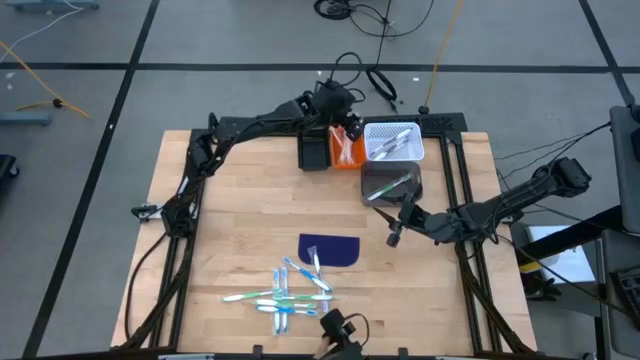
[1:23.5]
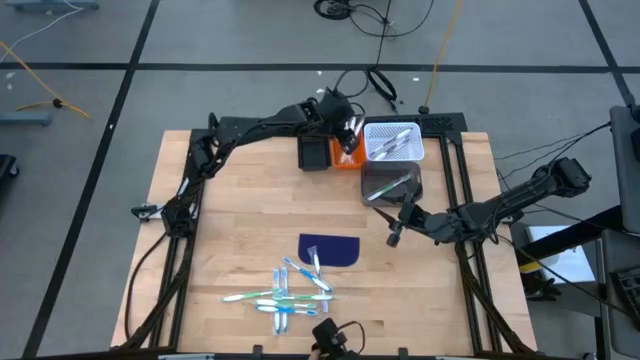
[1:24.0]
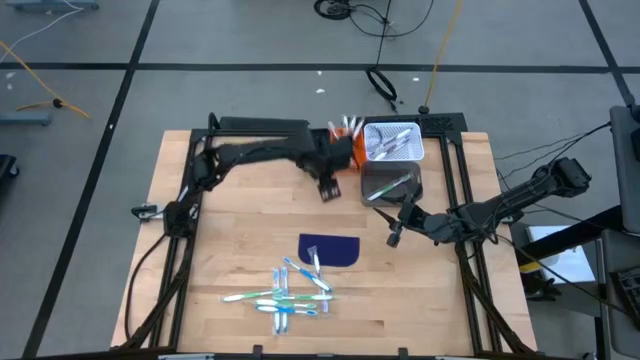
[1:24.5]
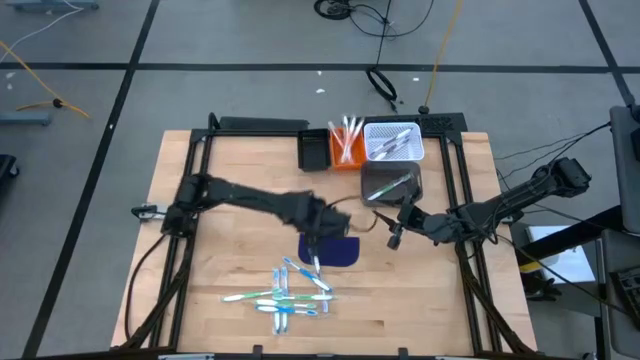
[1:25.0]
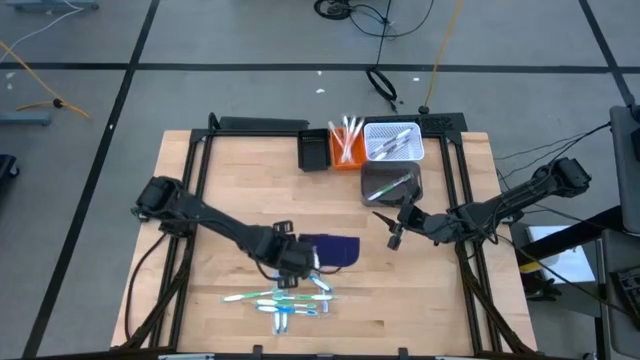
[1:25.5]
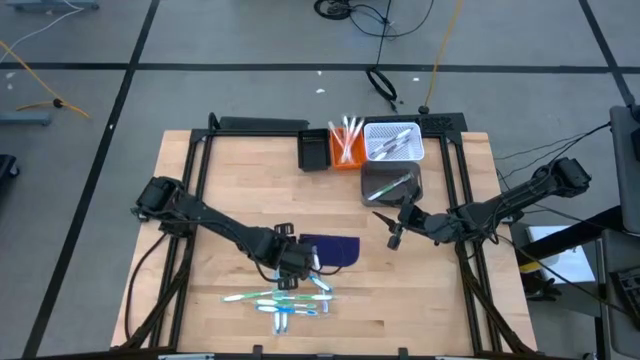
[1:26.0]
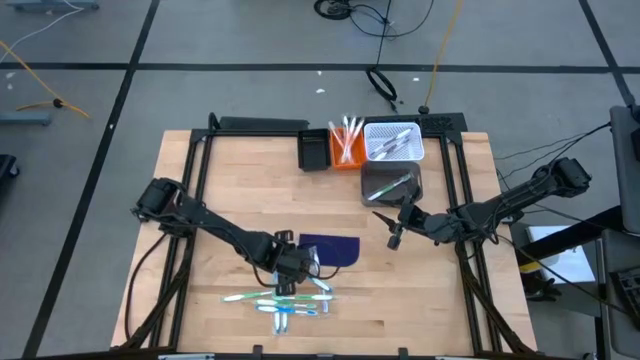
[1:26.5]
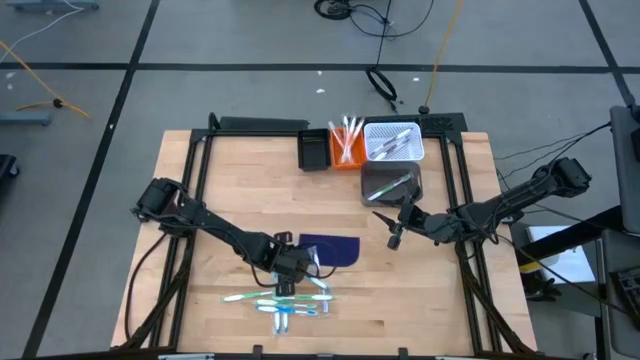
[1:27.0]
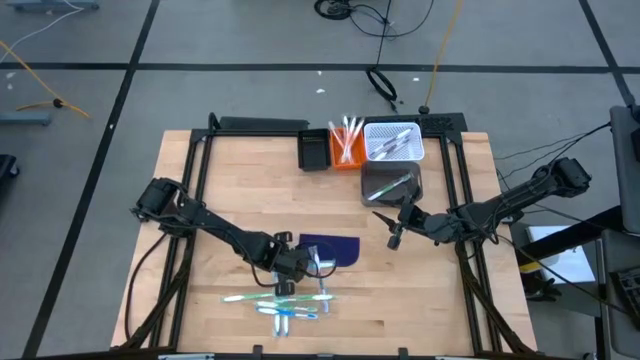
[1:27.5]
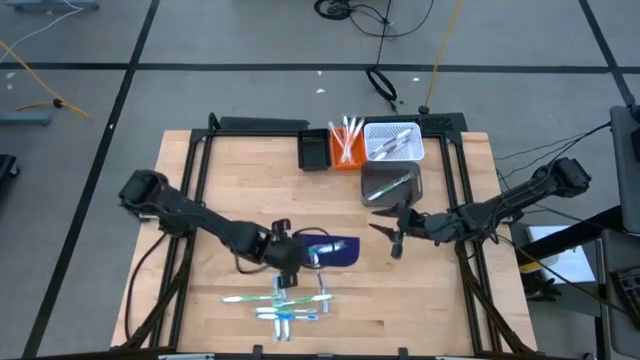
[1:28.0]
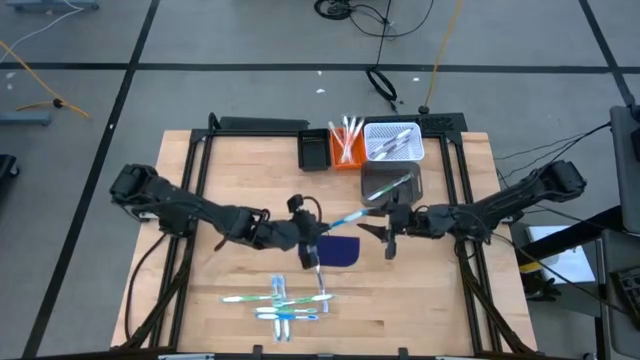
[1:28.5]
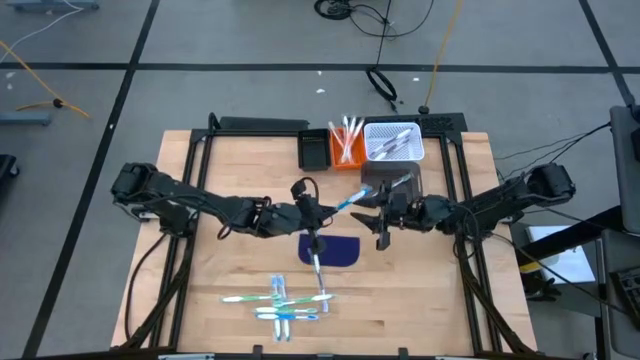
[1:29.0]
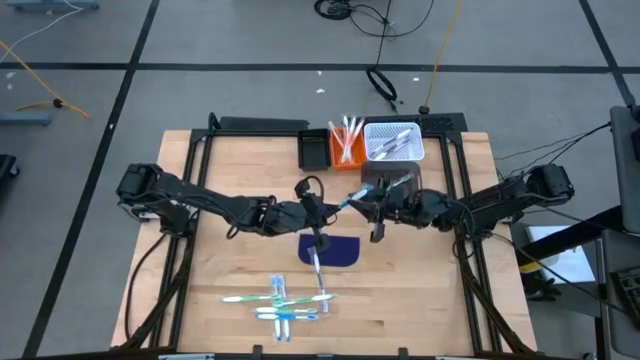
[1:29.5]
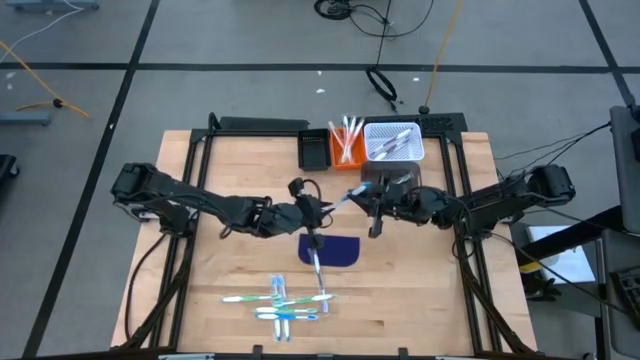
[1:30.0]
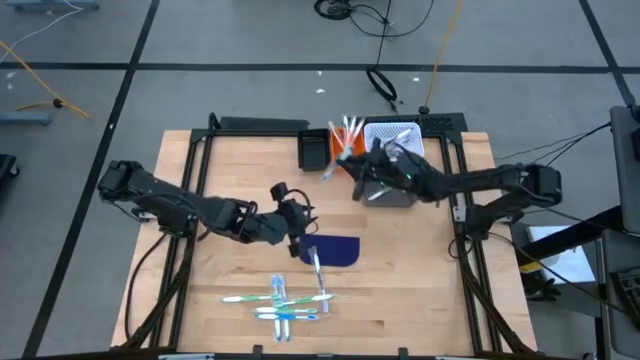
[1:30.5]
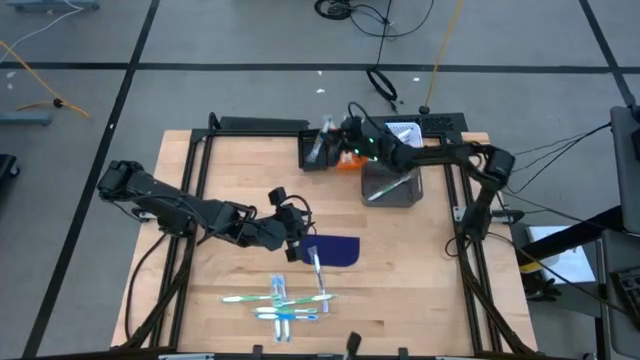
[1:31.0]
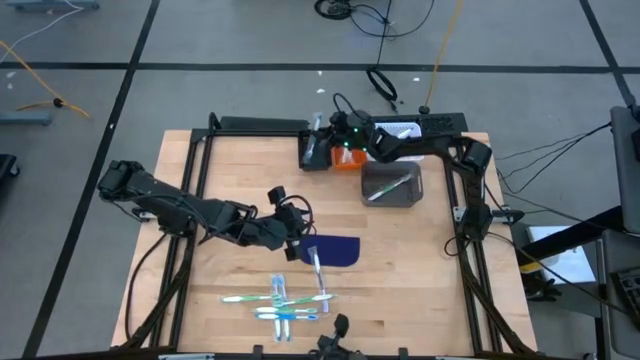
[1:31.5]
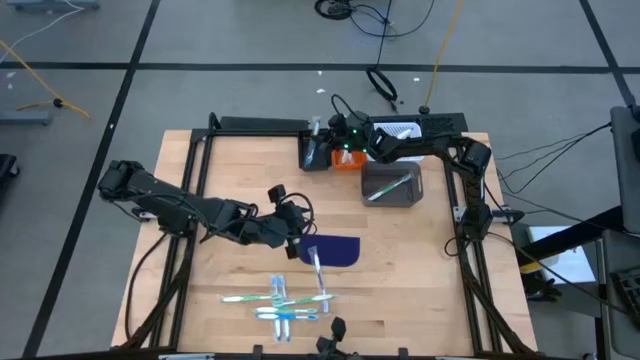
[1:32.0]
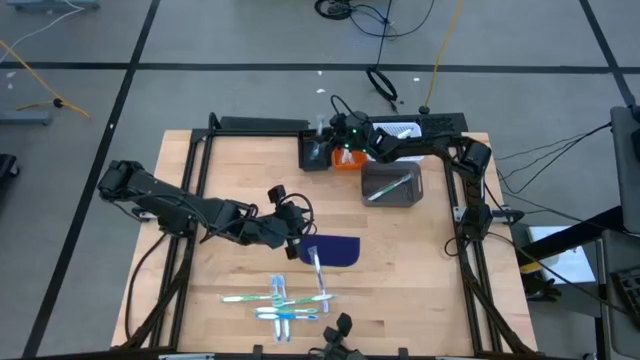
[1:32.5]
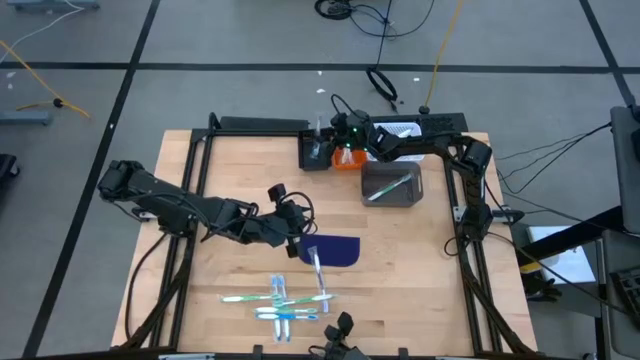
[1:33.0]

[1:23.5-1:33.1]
Task: Pick & Place Toothbrushes
Put the blue toothbrush into the black bin

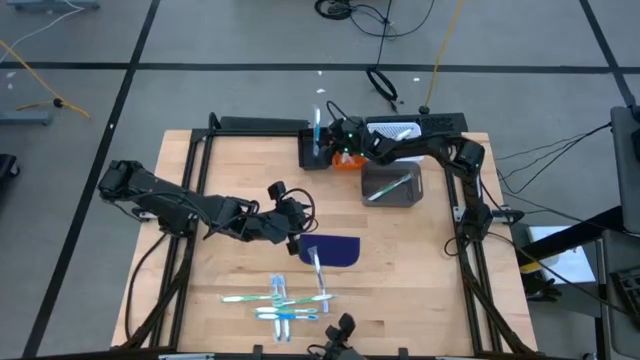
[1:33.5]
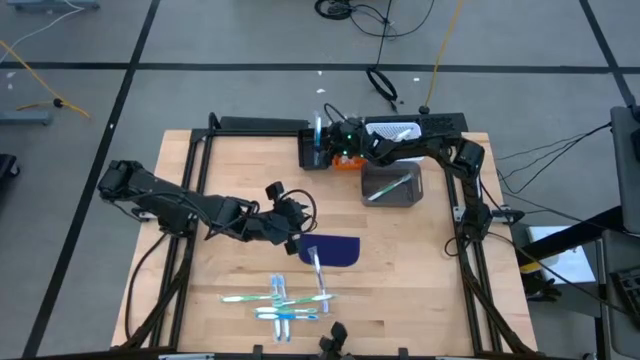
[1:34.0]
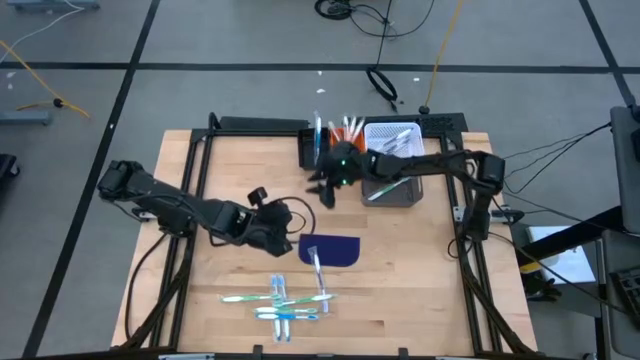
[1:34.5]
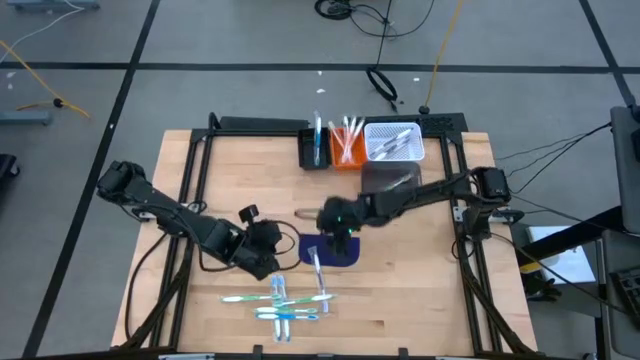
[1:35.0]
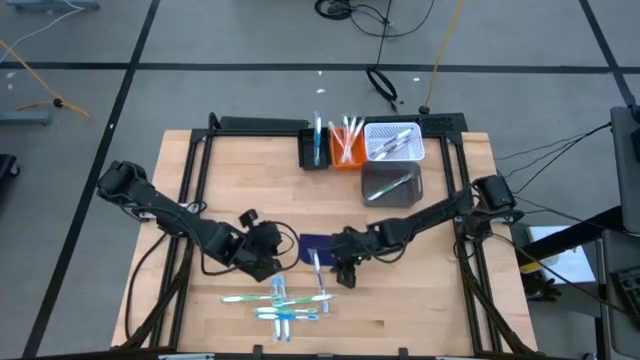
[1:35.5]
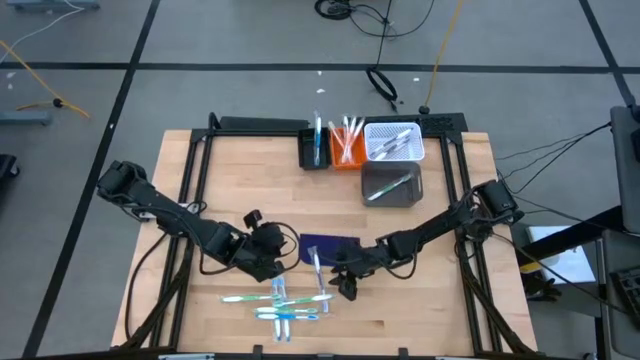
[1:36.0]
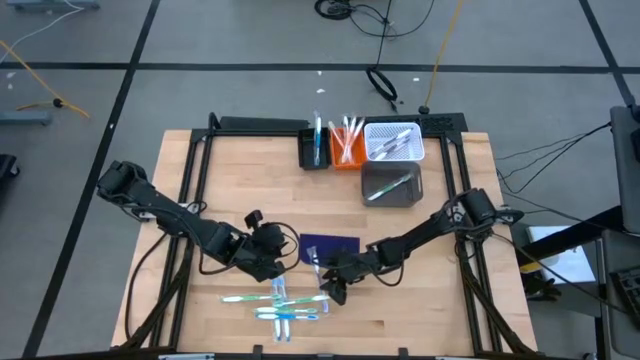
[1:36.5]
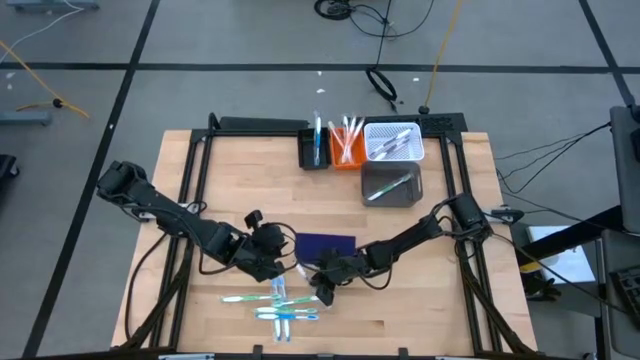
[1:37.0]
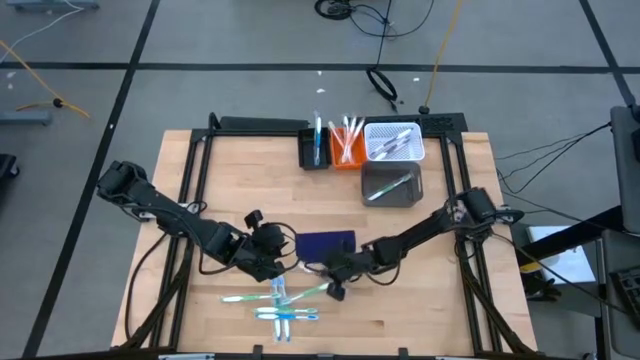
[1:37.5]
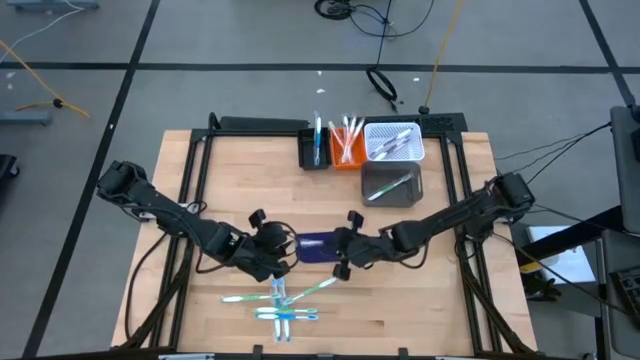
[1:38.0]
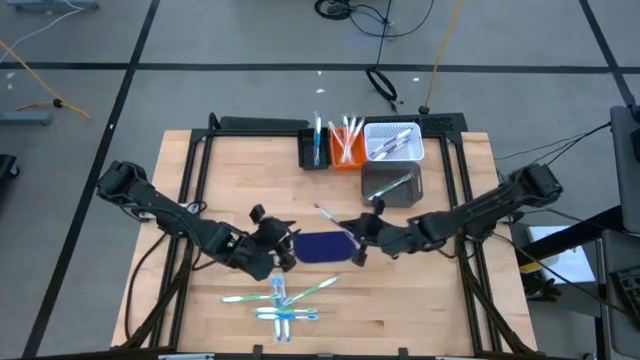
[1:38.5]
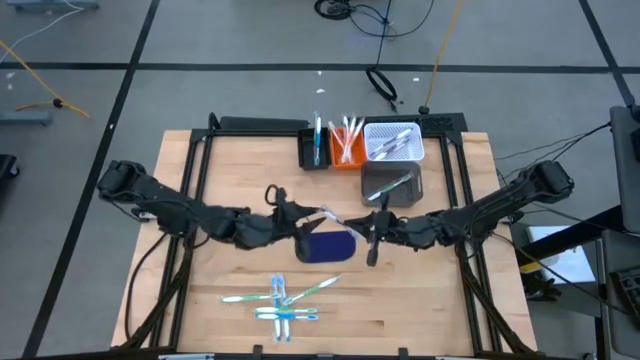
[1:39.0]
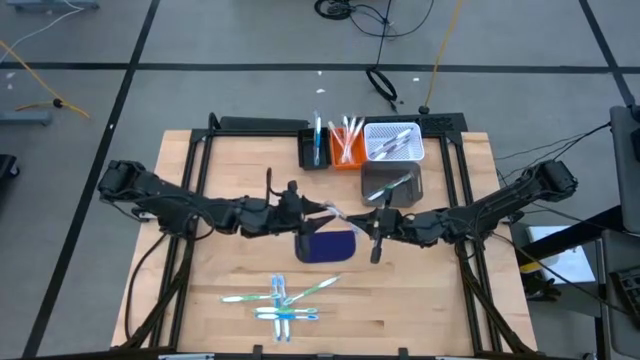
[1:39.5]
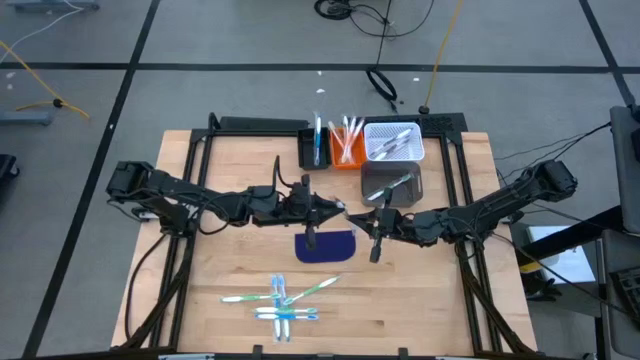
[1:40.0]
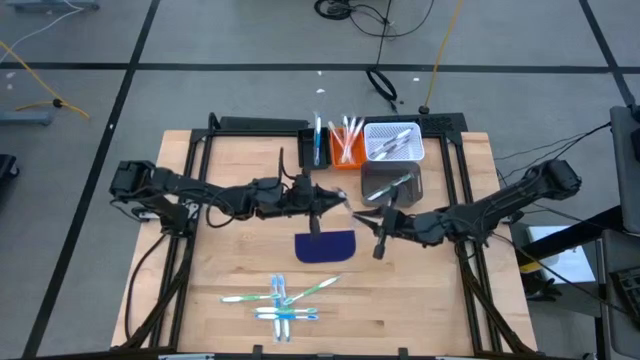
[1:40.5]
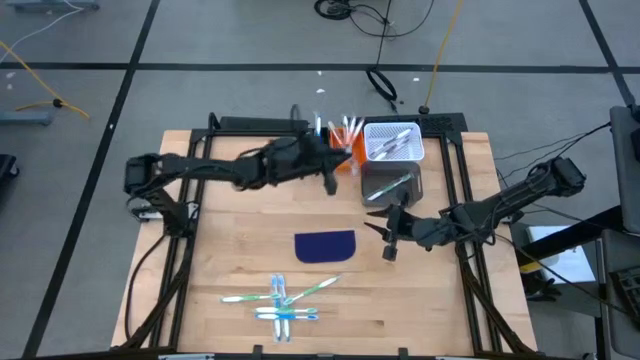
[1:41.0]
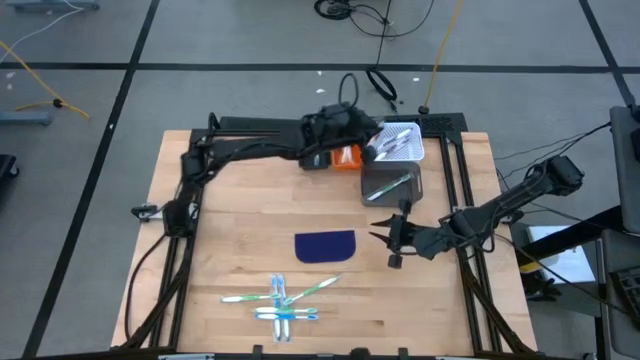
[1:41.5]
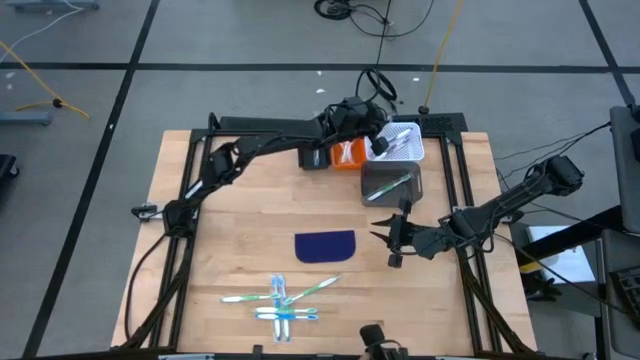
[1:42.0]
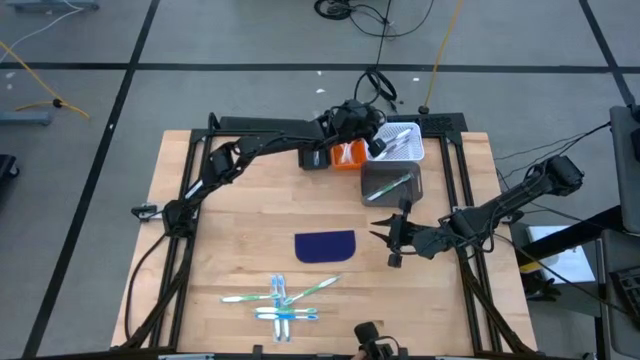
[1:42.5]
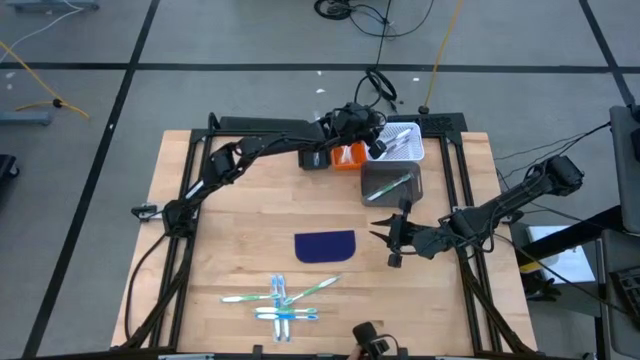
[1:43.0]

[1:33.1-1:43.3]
Put the purple toothbrush into the white bin

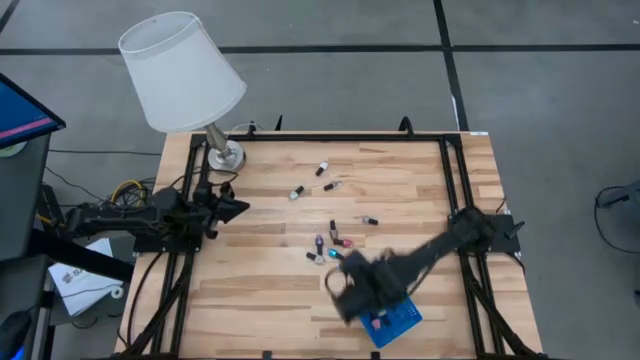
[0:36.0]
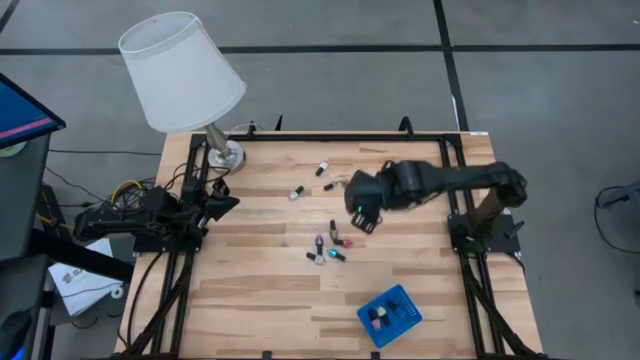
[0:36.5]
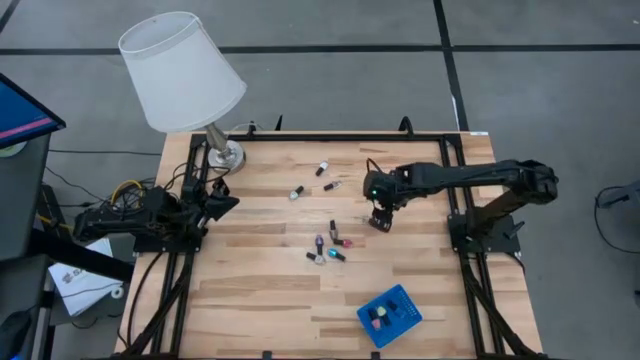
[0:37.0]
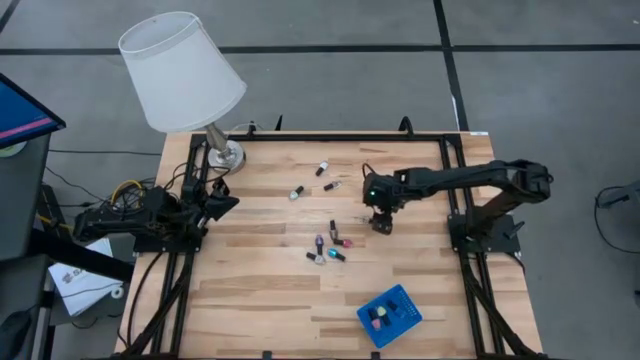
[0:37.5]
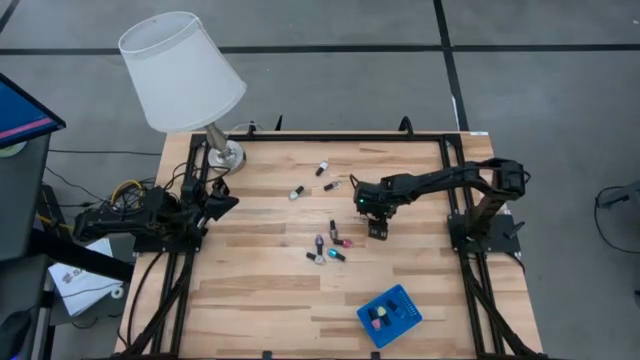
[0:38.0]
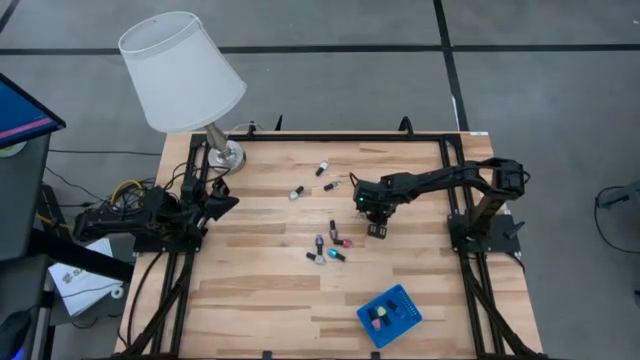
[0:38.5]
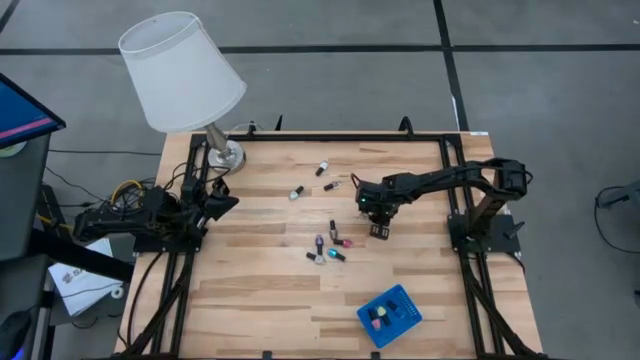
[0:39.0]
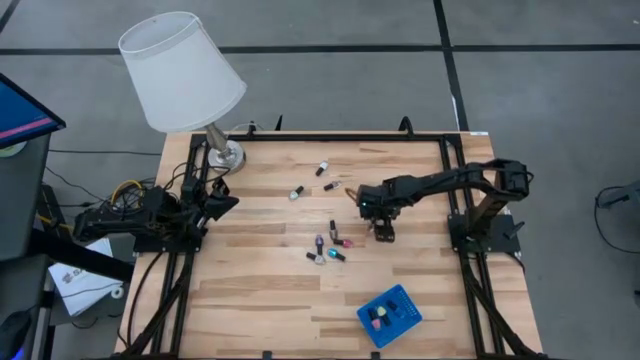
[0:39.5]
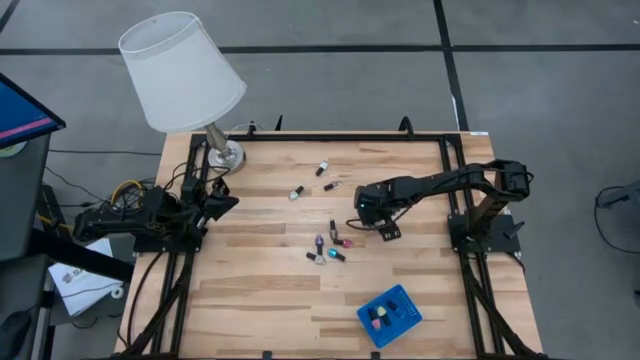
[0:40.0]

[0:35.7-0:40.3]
Task: Pick & Place Nail Polish
Put the bottom transparent nail polish into the blue bin
